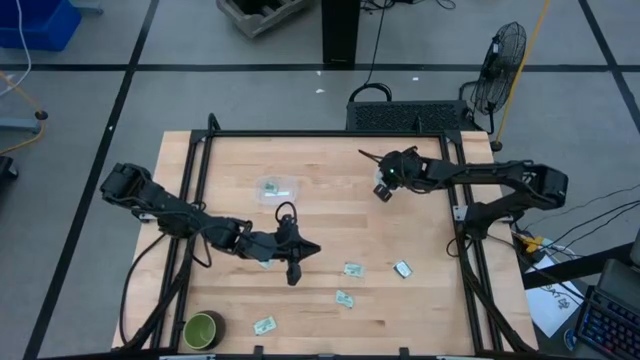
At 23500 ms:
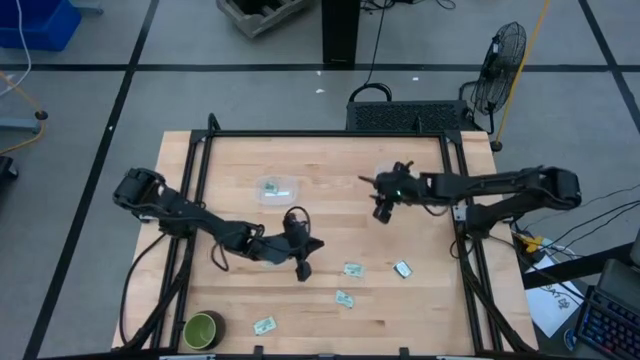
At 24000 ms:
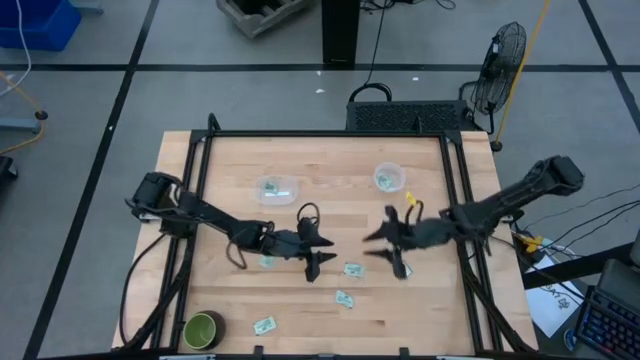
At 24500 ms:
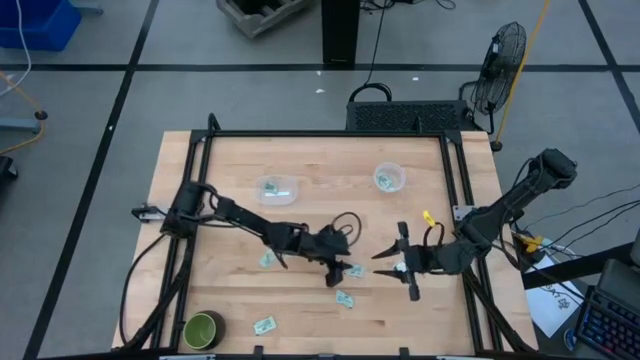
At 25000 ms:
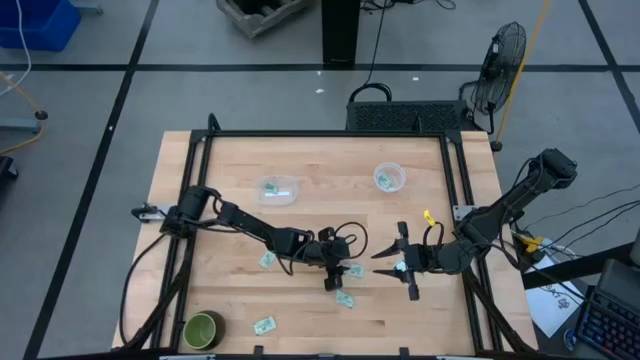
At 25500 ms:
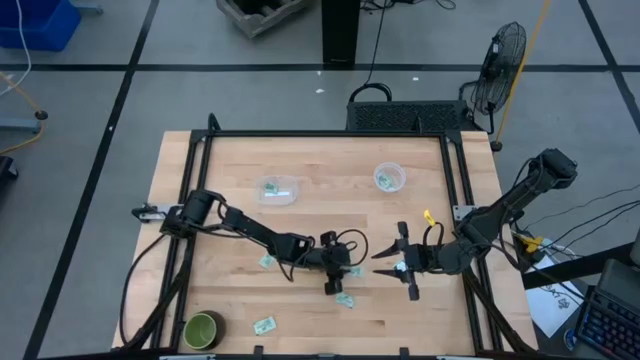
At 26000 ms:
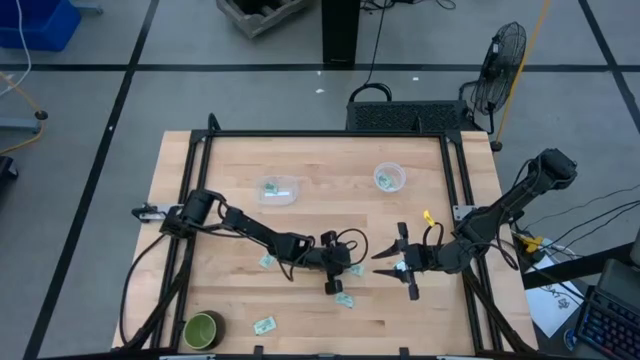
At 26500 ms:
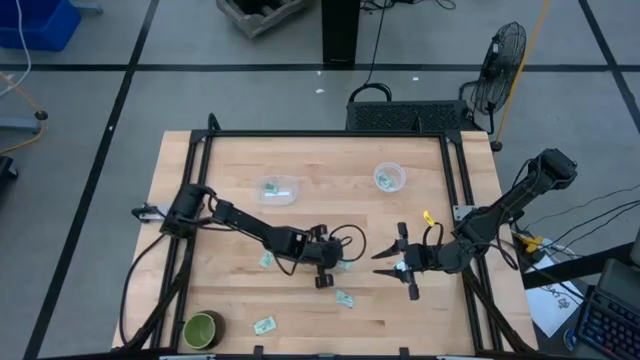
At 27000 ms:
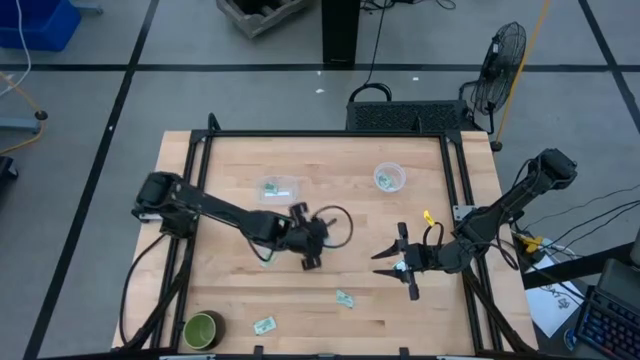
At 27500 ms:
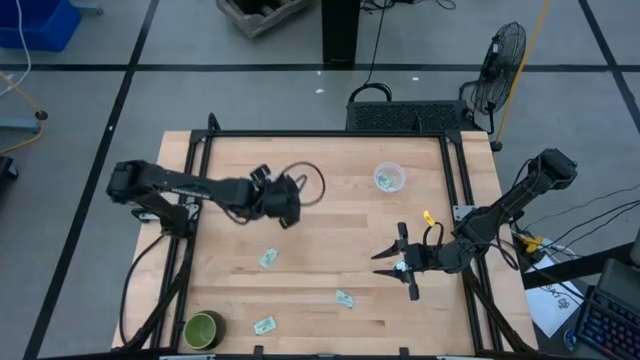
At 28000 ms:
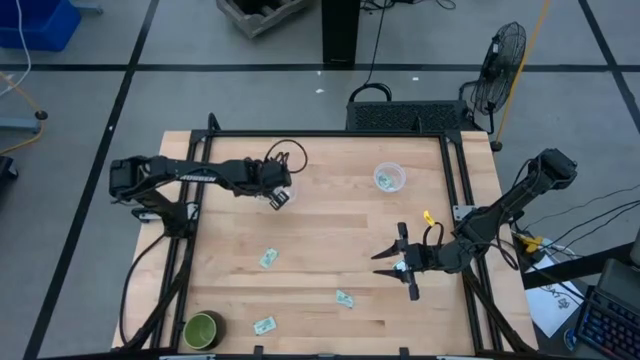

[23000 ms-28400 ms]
Task: Pick and place items into bin
Put the stevia packet into the left transparent bin

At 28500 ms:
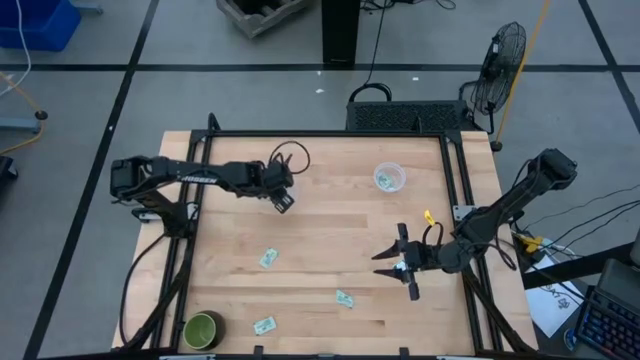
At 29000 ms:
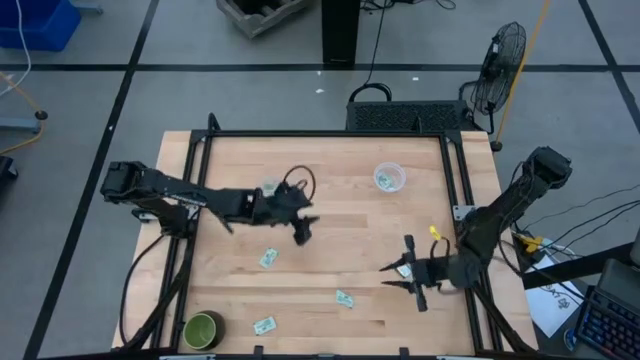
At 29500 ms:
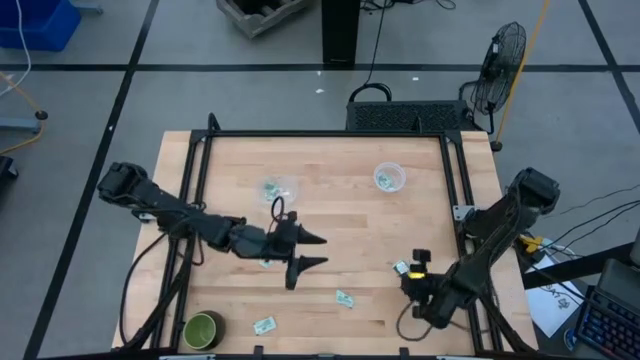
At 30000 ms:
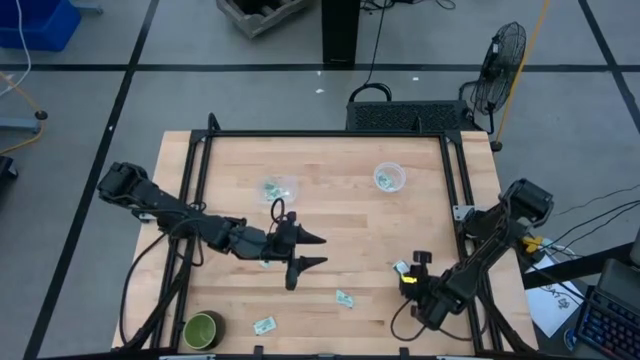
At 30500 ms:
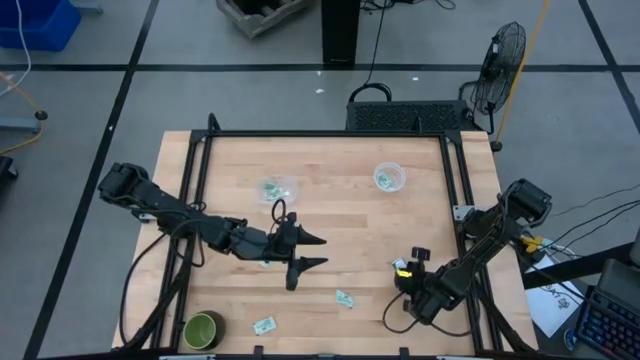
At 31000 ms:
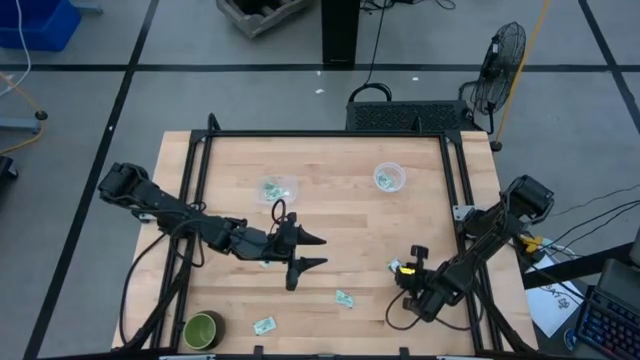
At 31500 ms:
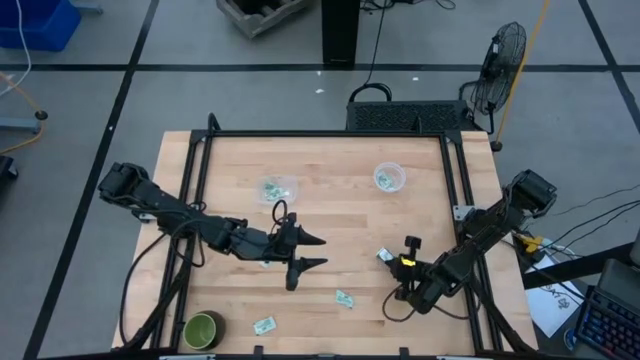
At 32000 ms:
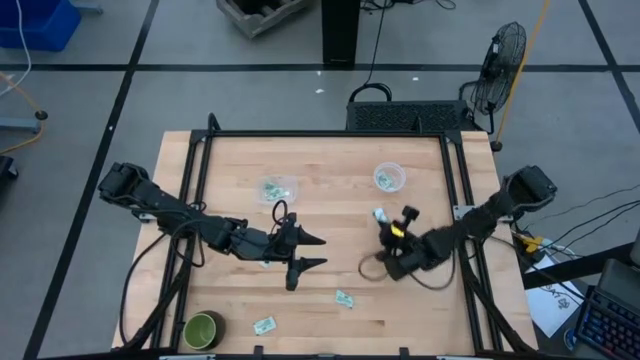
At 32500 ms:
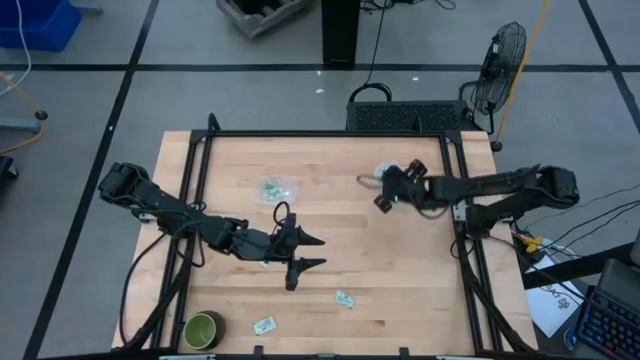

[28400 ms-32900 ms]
Put the stevia packet into the right transparent bin

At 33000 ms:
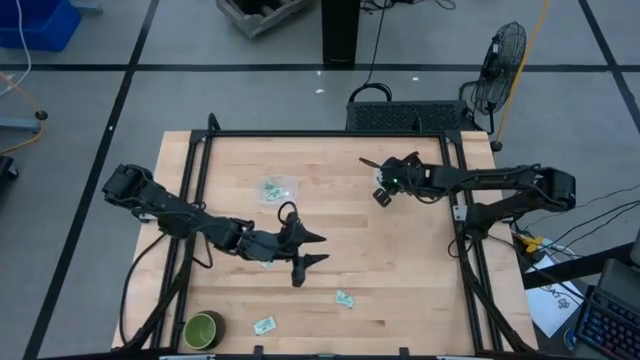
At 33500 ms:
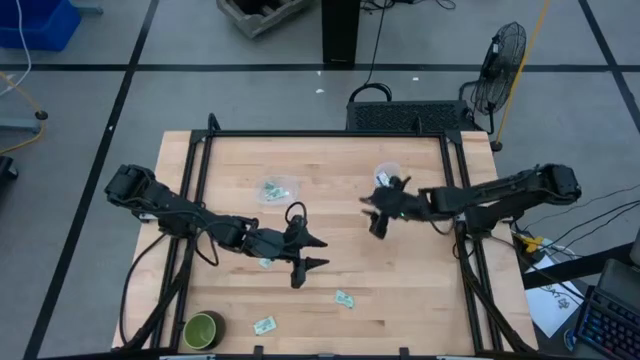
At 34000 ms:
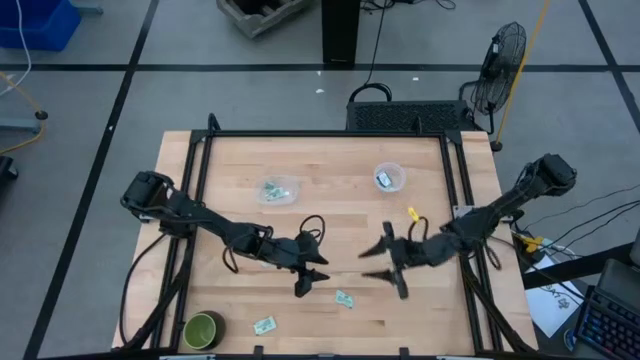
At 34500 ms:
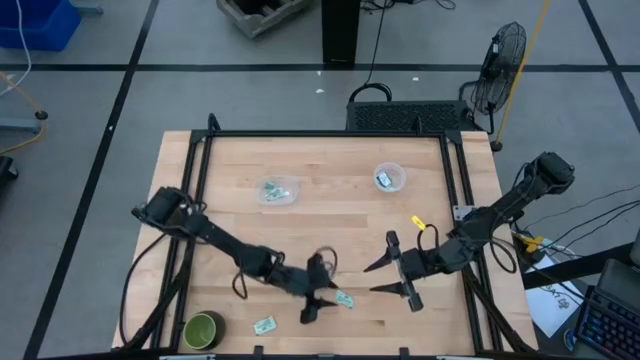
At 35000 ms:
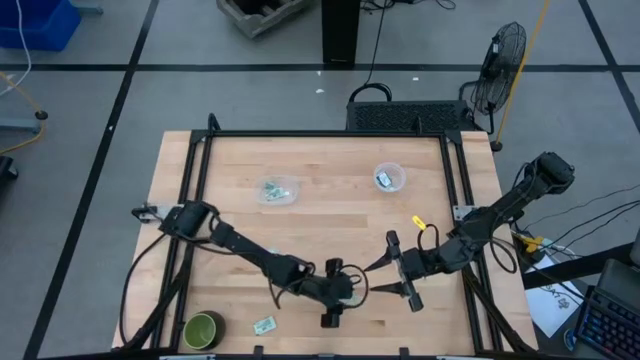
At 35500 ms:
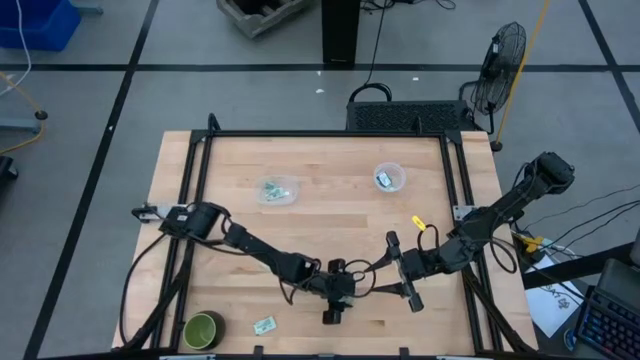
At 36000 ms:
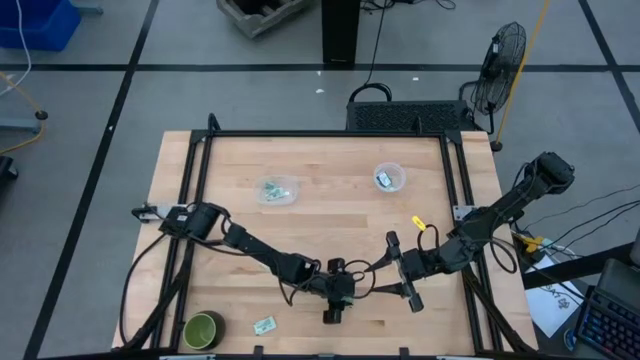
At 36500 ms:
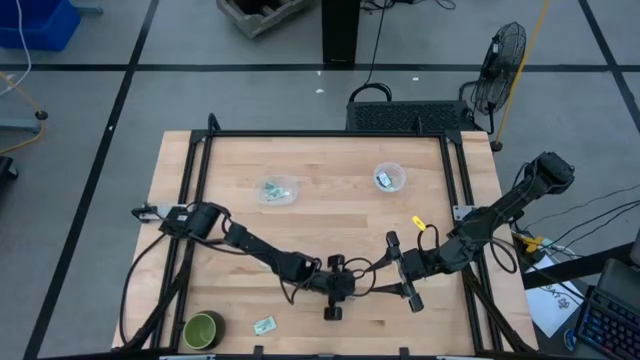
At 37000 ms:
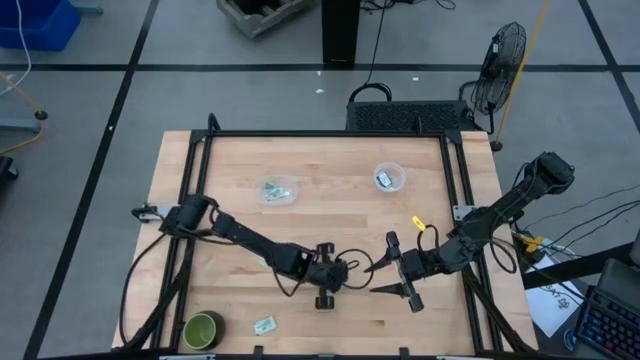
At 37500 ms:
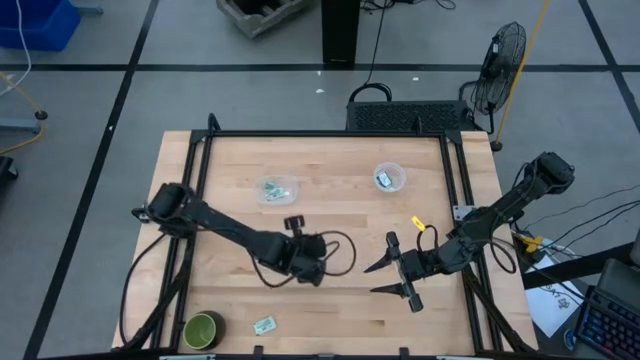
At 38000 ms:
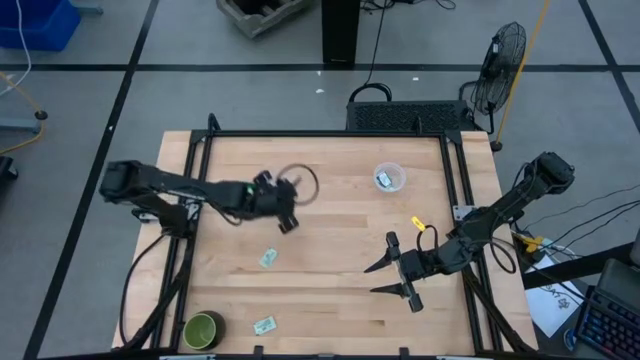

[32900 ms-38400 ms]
Put the stevia packet into the left transparent bin

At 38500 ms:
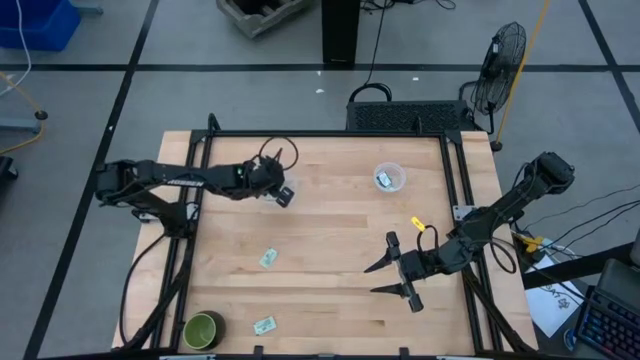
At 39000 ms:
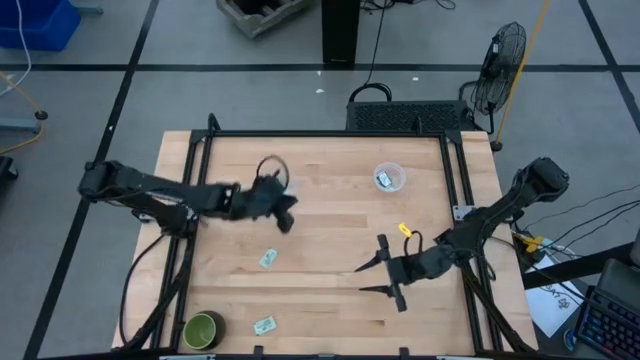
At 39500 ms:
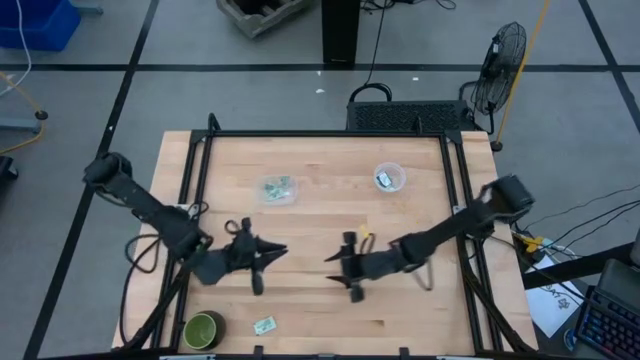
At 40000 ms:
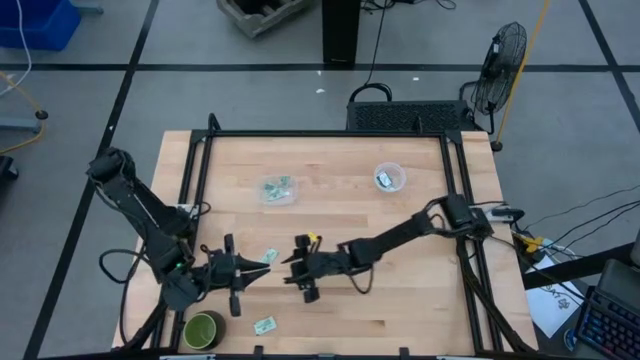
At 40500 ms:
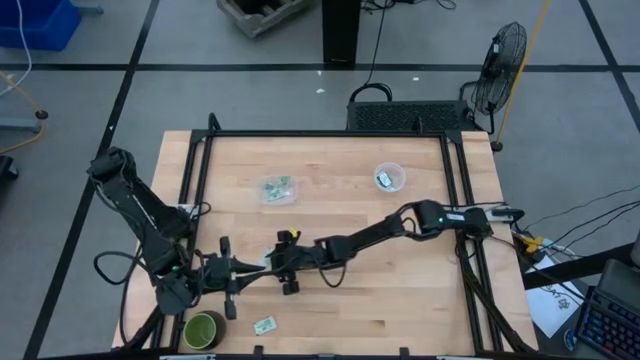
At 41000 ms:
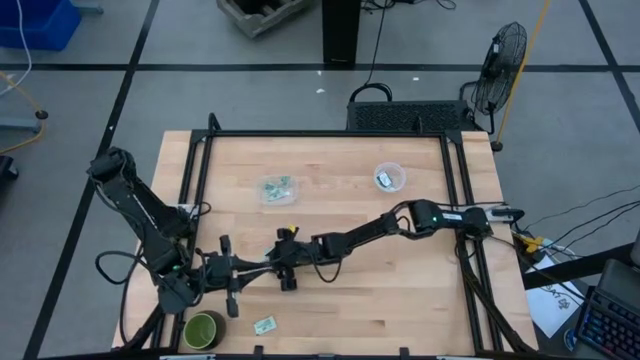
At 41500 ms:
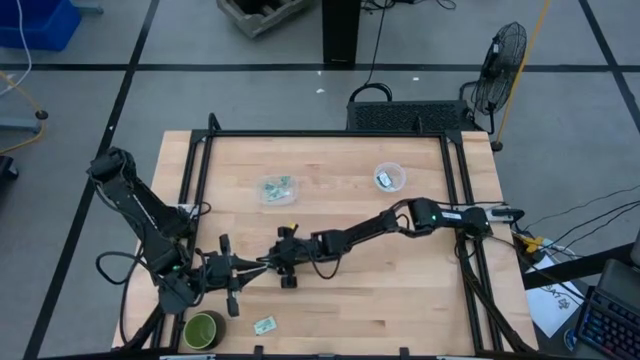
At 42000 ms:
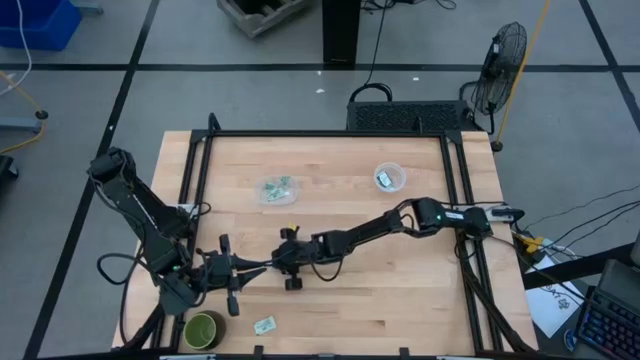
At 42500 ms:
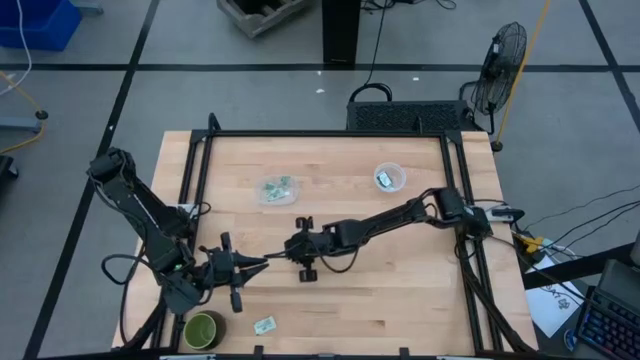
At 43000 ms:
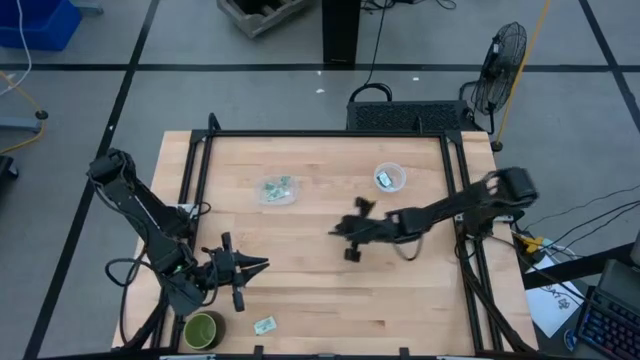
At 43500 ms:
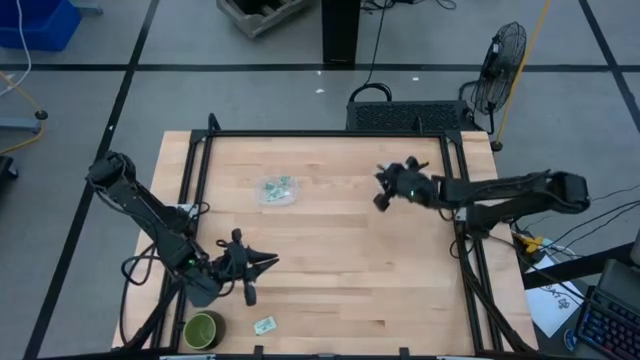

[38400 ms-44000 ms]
Put the stevia packet into the right transparent bin
